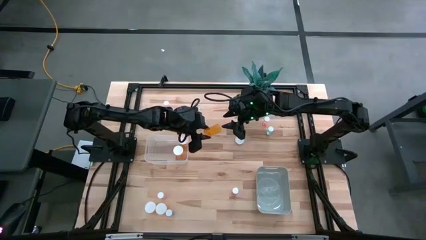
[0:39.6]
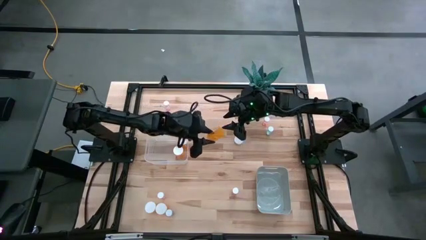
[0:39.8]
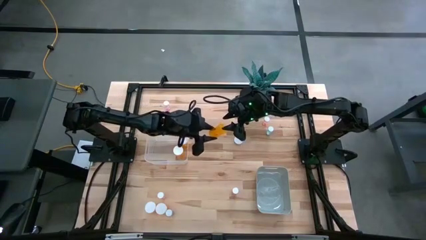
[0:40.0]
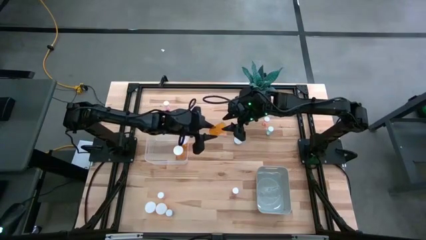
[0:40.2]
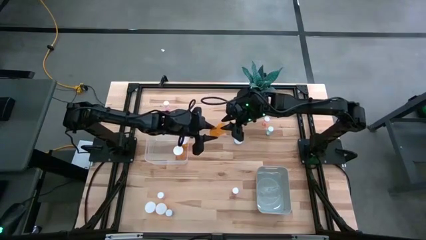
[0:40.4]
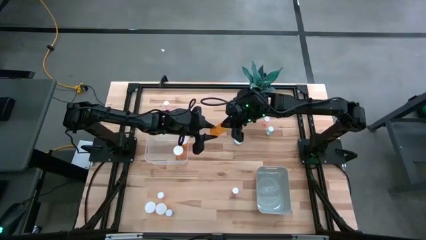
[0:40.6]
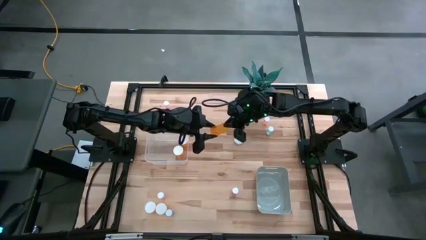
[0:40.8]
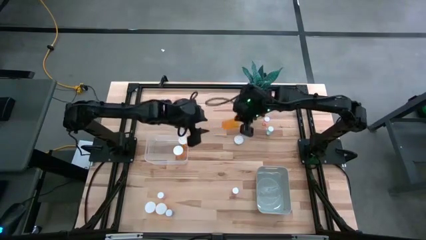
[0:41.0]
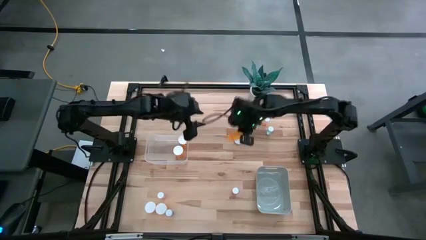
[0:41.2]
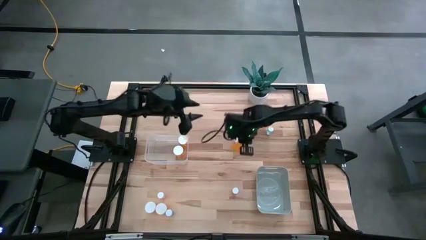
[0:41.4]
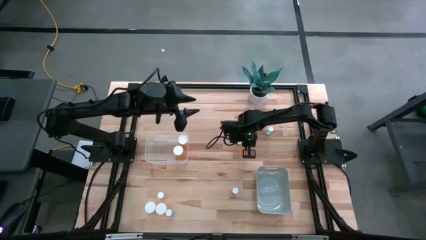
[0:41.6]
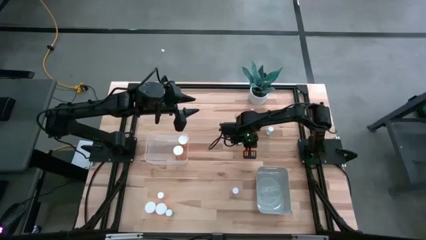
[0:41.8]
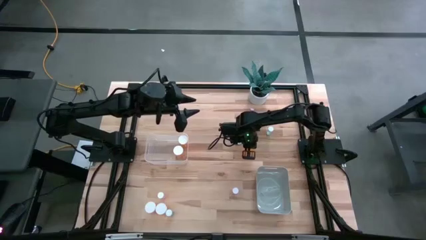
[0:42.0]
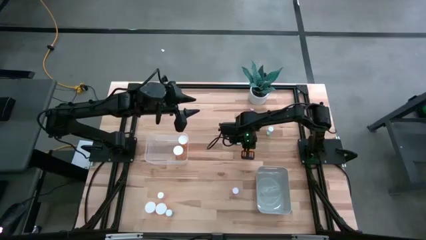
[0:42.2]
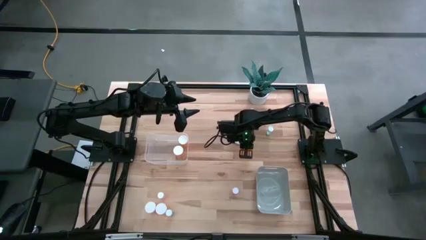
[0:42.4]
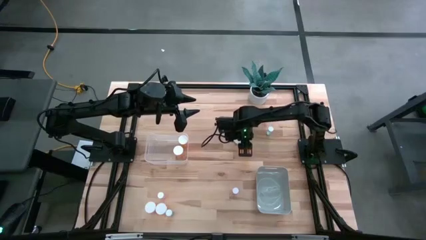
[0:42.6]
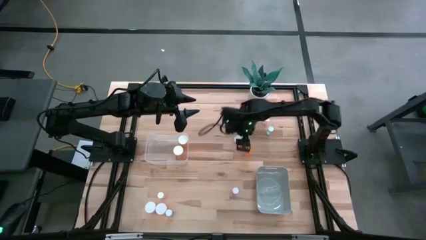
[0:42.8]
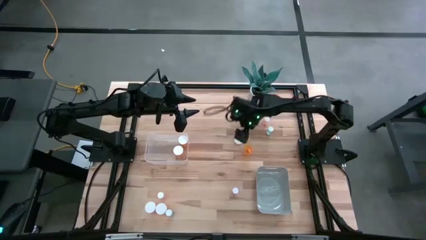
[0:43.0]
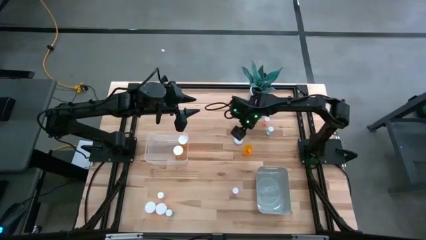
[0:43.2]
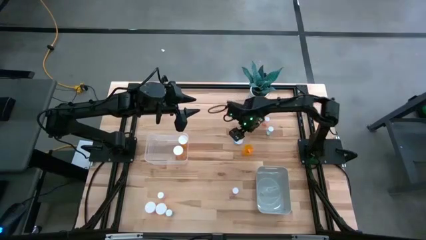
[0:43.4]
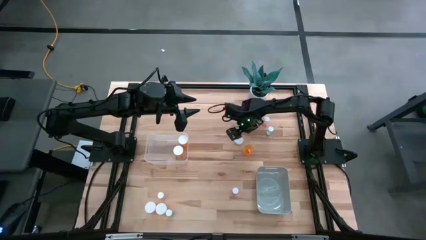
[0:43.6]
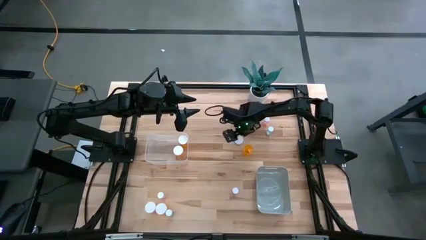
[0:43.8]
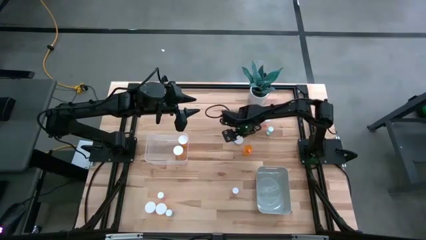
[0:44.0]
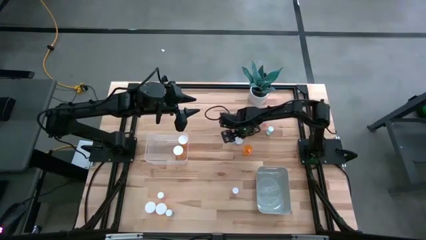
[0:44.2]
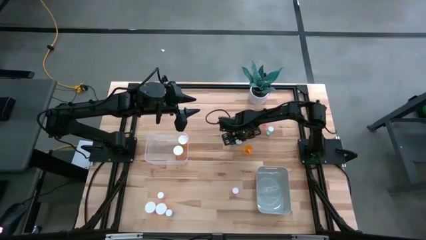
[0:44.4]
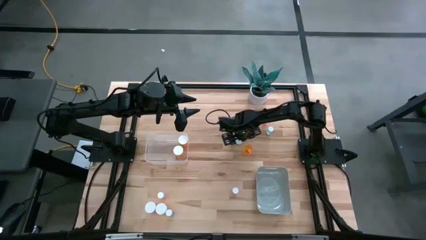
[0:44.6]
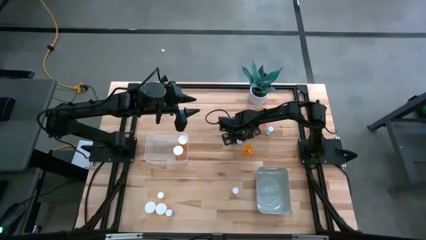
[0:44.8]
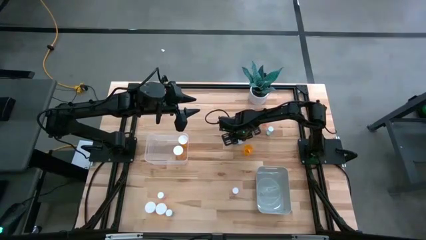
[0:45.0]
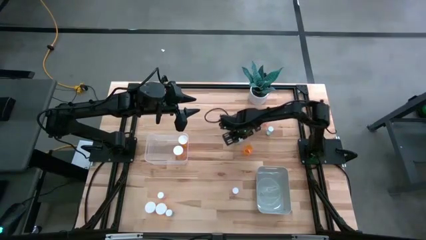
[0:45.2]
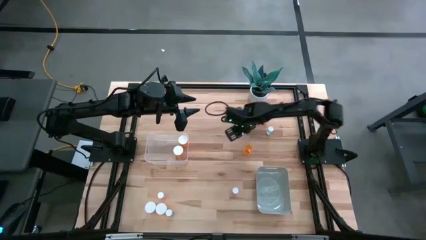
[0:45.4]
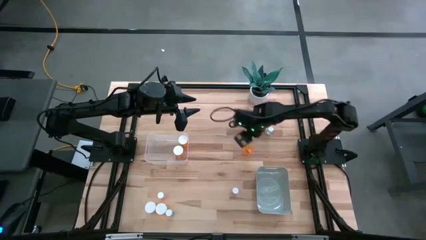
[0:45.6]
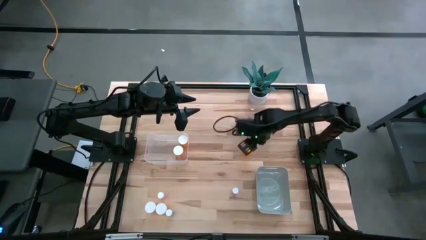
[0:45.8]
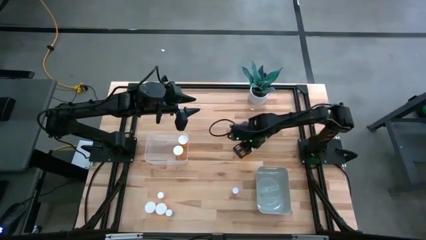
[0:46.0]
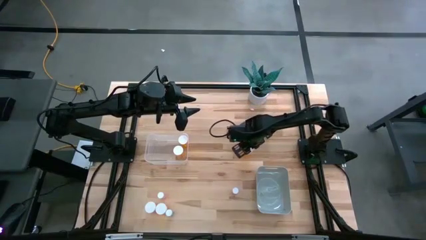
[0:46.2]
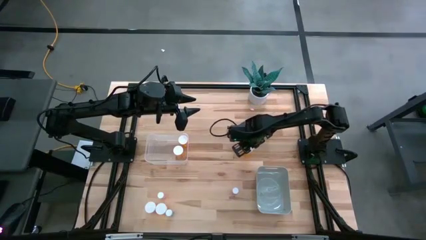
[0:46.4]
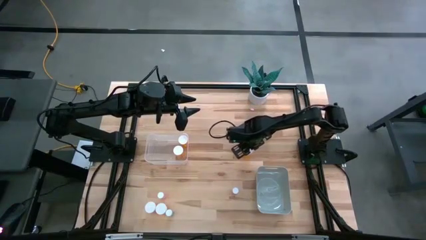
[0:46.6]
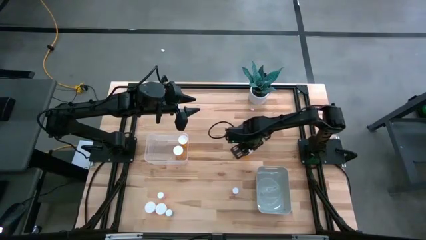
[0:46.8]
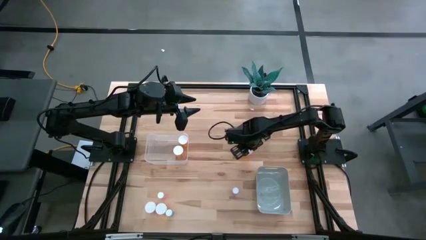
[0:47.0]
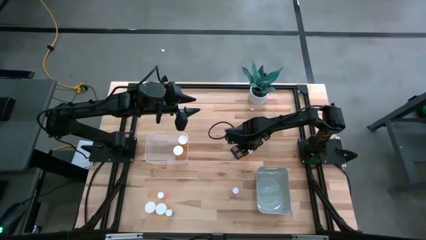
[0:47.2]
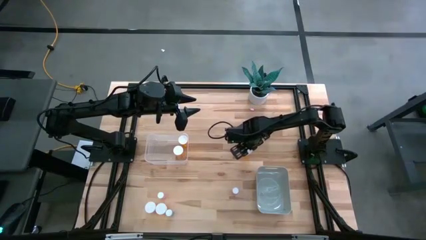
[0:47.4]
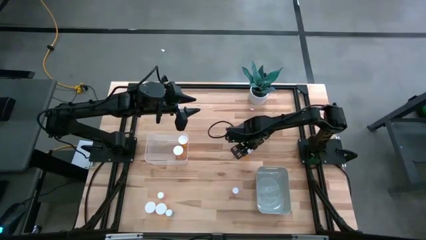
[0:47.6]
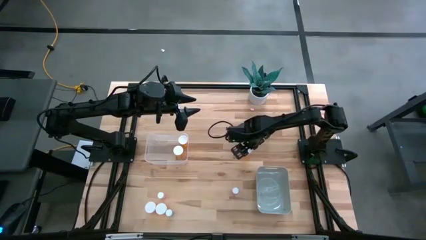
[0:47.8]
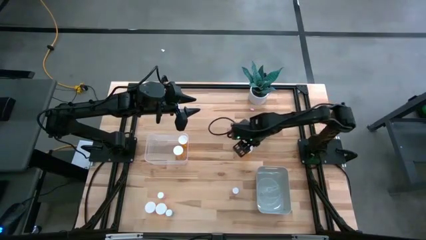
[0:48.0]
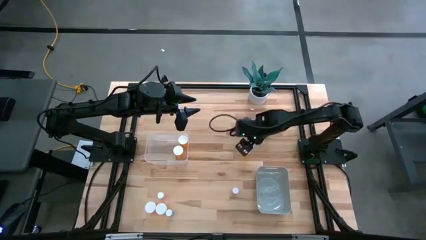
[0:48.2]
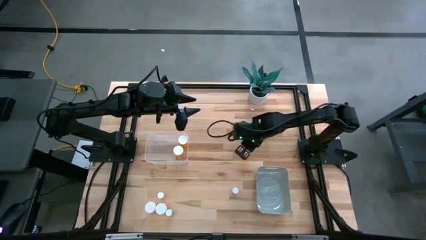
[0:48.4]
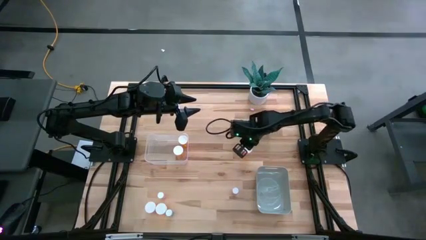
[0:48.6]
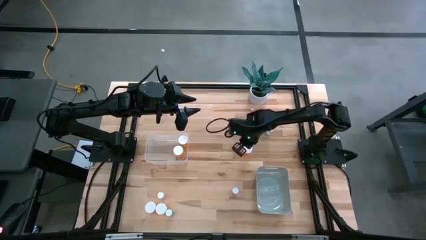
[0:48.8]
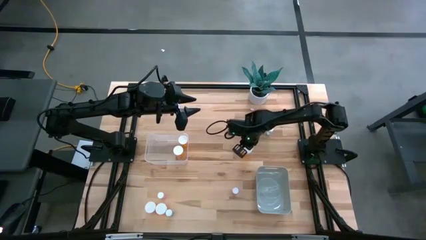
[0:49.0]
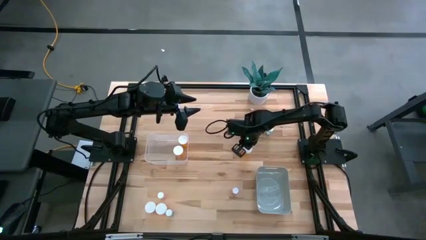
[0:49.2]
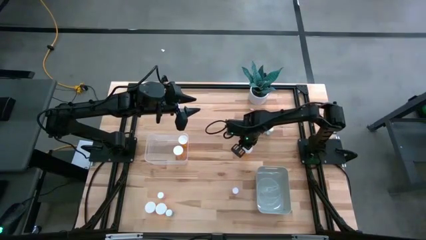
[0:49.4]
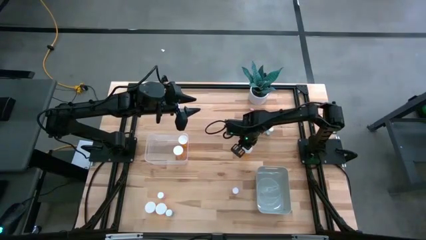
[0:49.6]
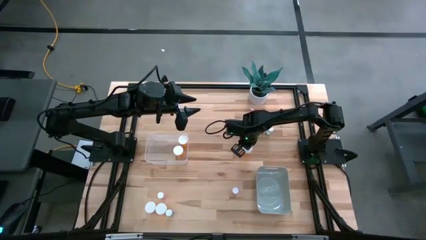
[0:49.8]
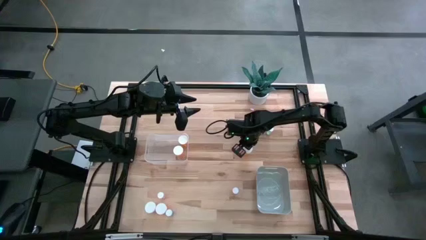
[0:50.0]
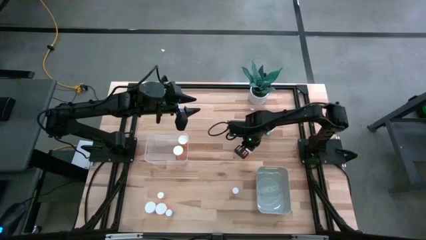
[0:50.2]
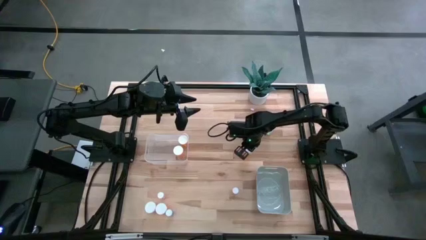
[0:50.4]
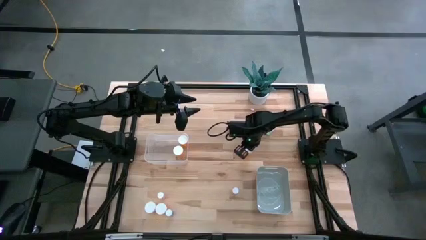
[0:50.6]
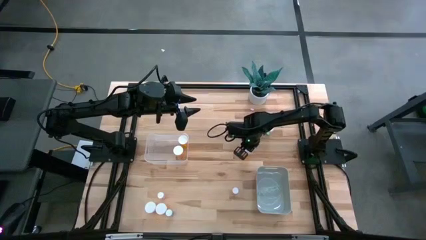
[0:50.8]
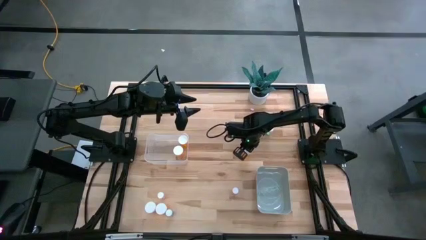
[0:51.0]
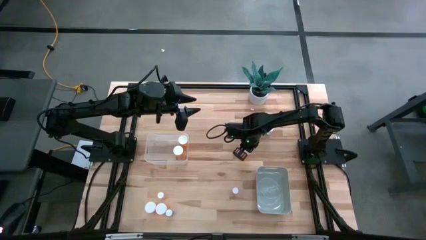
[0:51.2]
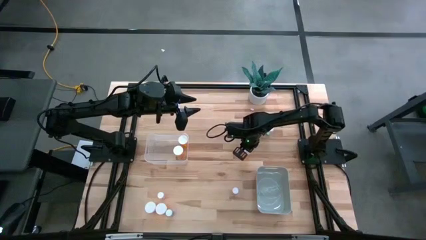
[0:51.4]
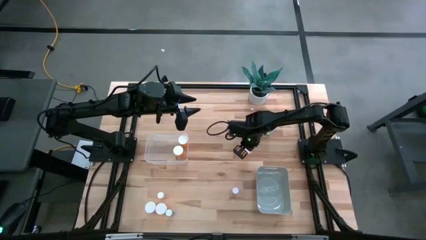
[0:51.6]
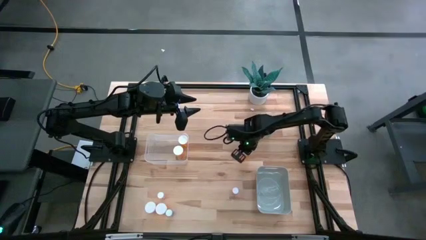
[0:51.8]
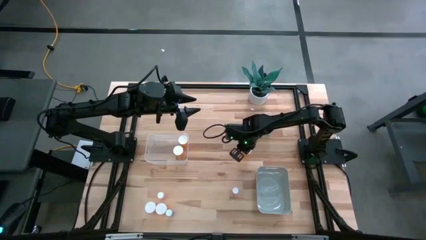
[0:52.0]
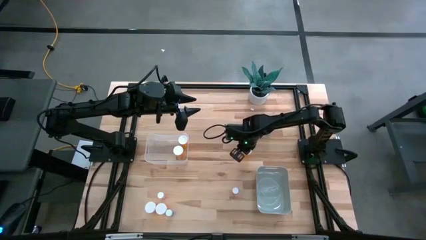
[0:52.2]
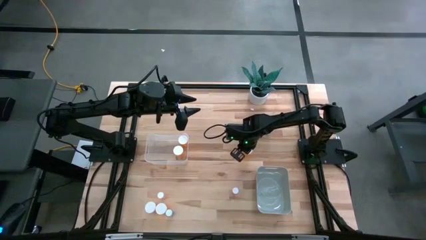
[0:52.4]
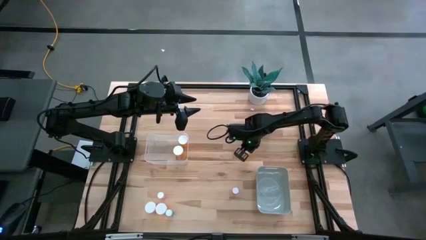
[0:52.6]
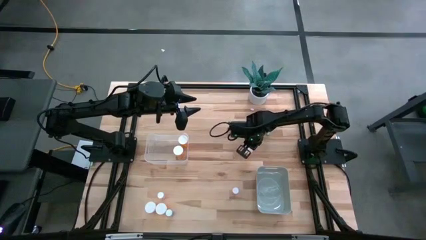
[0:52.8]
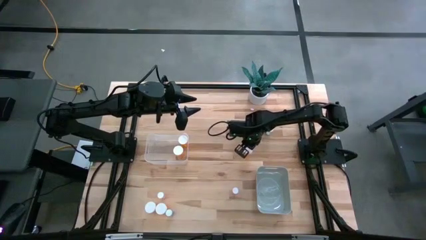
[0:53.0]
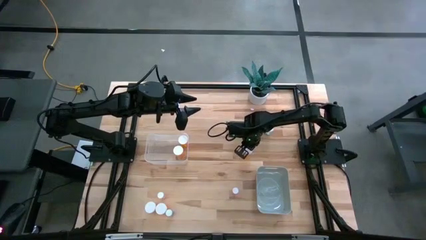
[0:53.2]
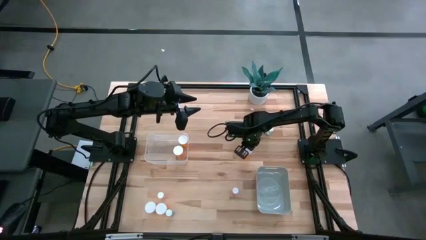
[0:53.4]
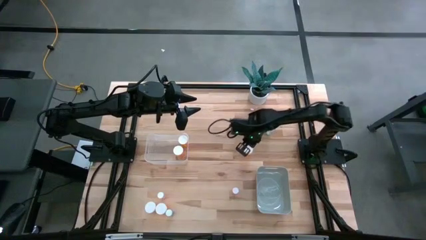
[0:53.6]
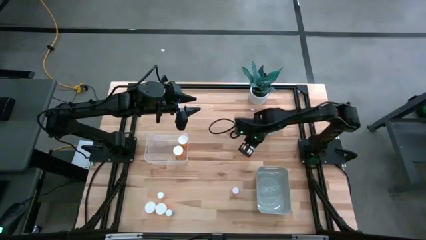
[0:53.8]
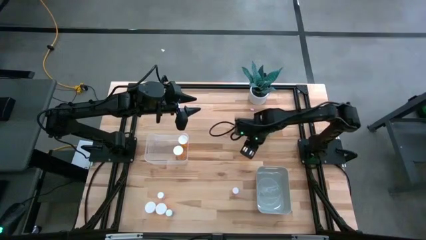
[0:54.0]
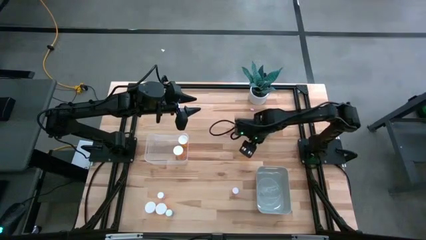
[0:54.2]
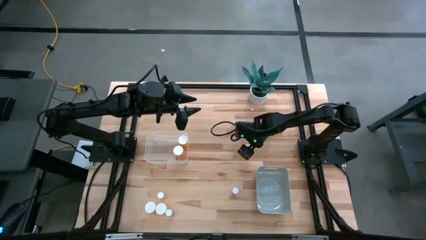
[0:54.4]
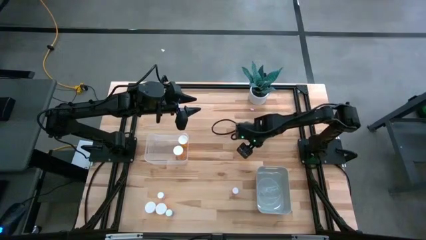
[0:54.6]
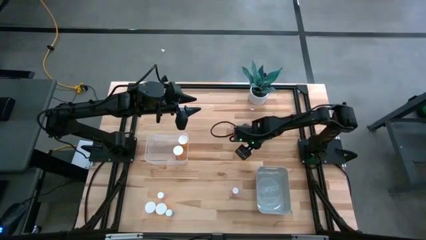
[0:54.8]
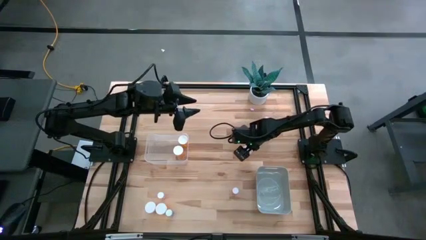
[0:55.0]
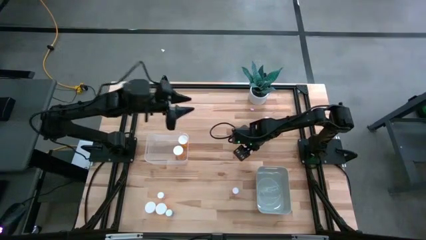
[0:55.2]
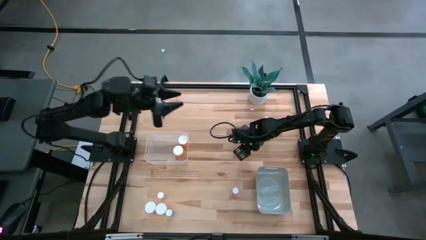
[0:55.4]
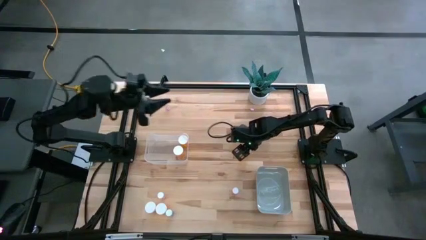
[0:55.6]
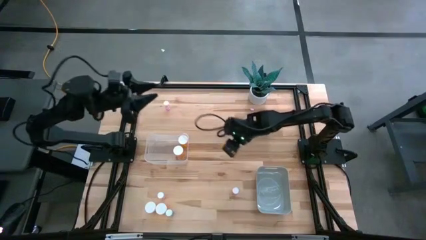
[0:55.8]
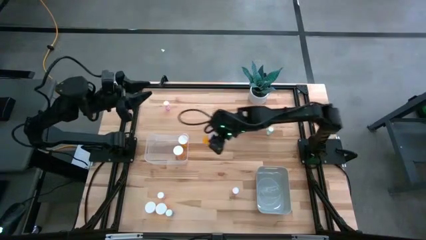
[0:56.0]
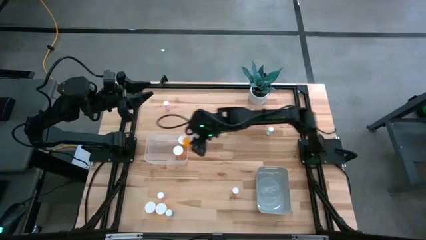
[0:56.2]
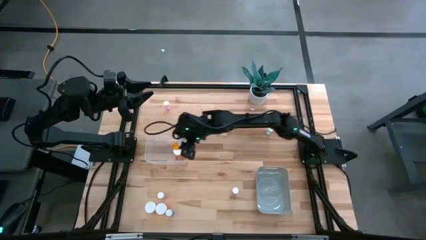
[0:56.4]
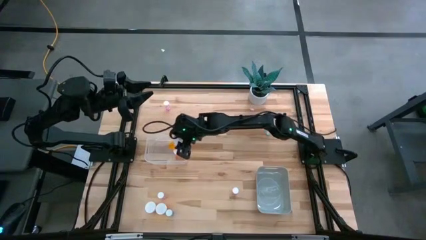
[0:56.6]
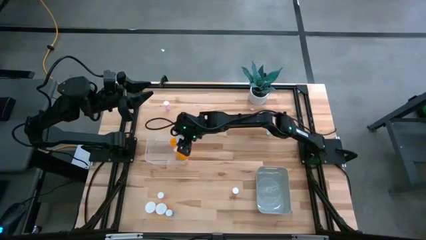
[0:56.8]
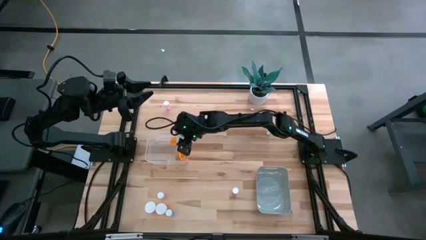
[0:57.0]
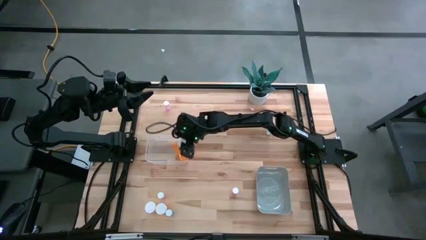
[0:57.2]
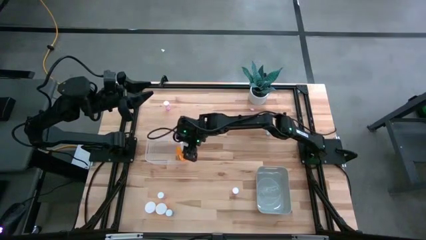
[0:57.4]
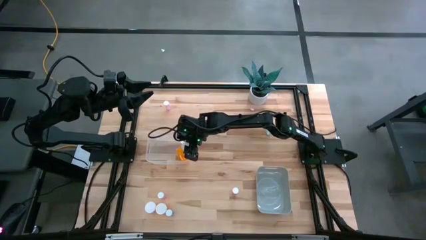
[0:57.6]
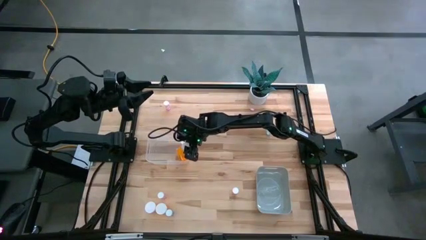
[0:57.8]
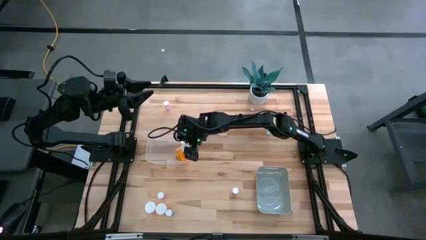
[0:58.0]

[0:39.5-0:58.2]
Task: Pick and place medicine bottles into bin by pill shape (circle, oval)
Put the large orange pill bottle into the transparent bin
